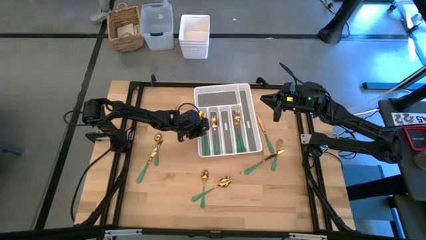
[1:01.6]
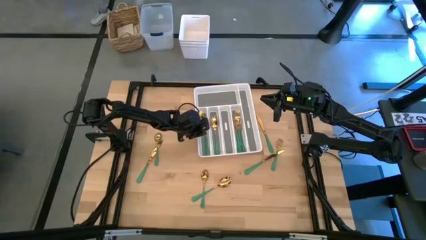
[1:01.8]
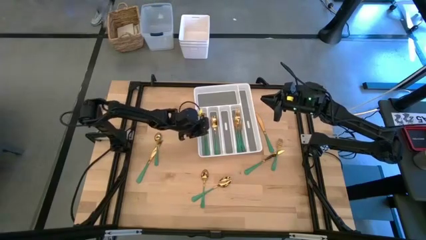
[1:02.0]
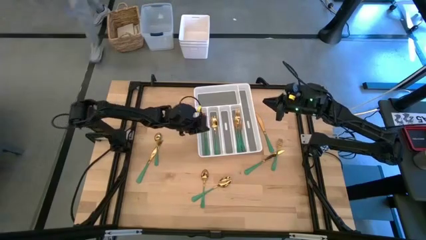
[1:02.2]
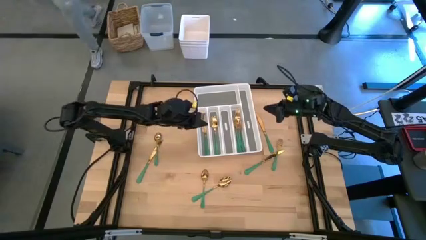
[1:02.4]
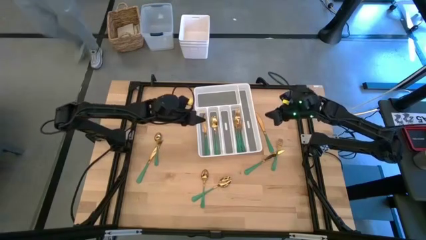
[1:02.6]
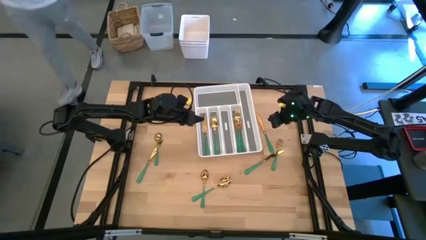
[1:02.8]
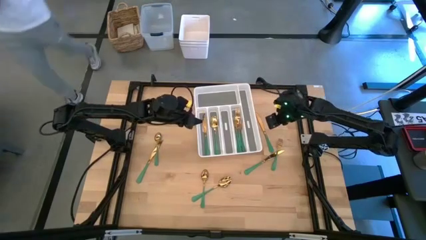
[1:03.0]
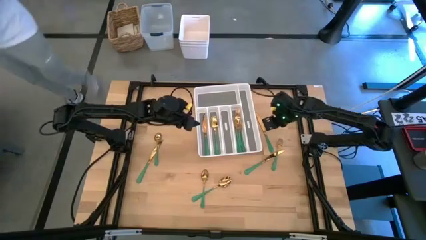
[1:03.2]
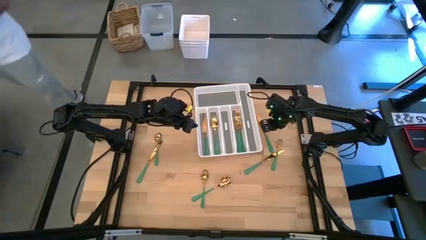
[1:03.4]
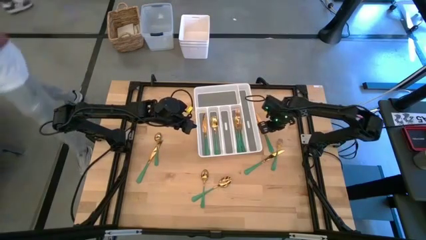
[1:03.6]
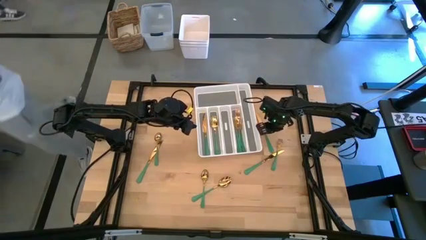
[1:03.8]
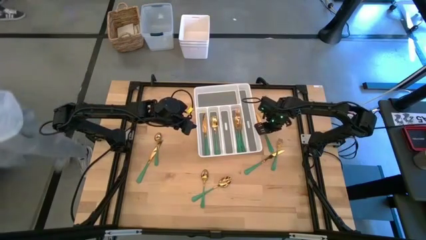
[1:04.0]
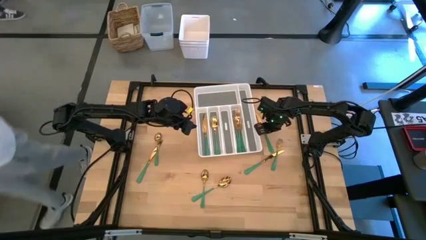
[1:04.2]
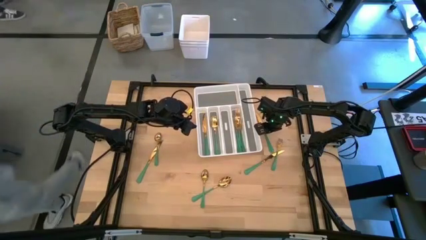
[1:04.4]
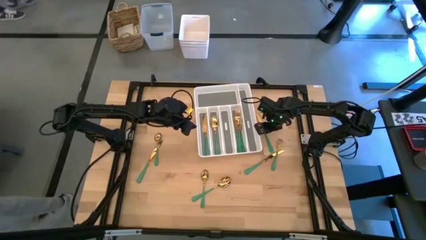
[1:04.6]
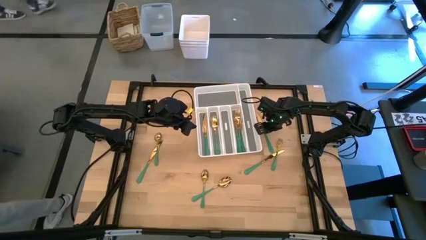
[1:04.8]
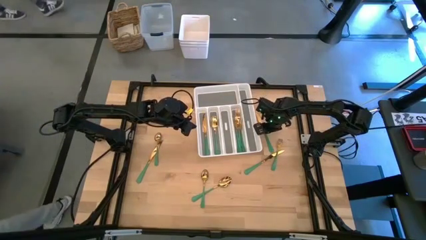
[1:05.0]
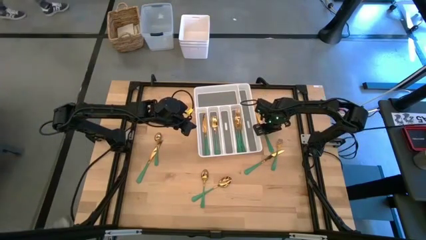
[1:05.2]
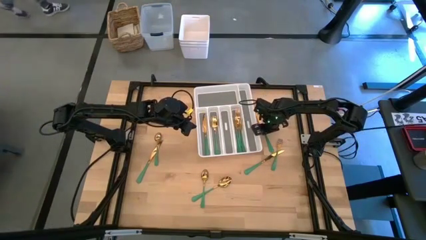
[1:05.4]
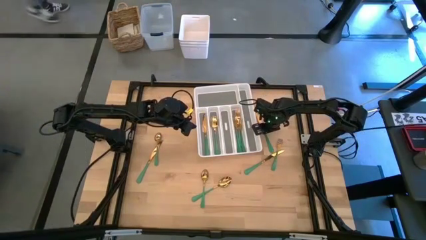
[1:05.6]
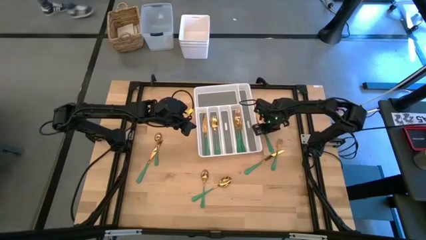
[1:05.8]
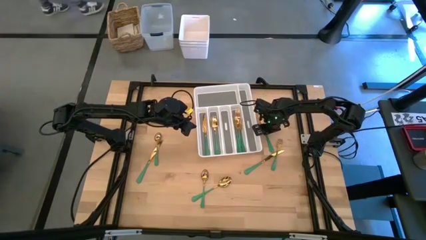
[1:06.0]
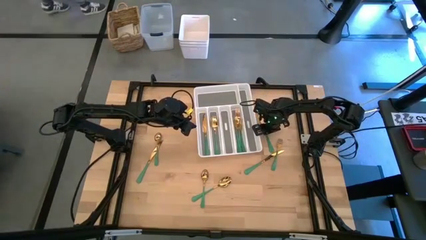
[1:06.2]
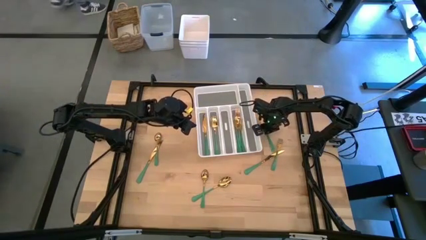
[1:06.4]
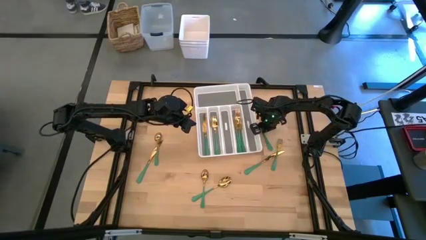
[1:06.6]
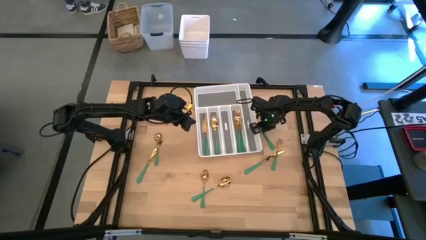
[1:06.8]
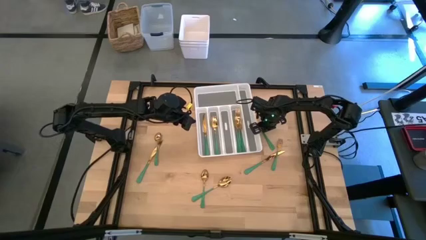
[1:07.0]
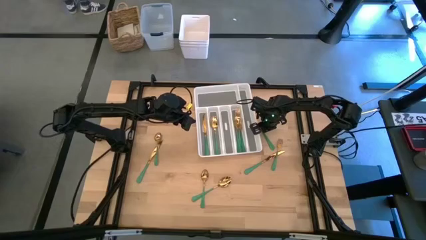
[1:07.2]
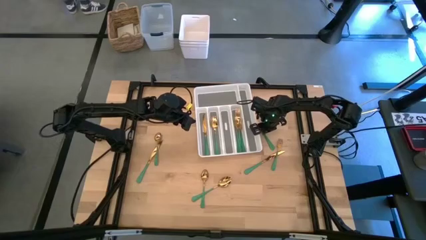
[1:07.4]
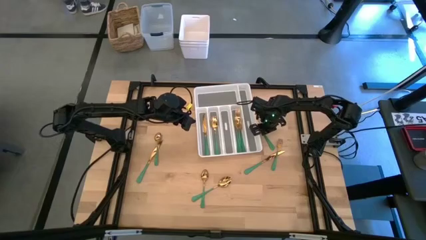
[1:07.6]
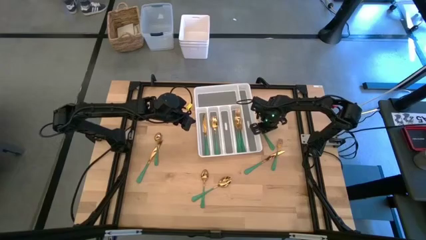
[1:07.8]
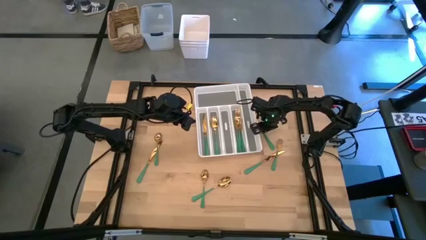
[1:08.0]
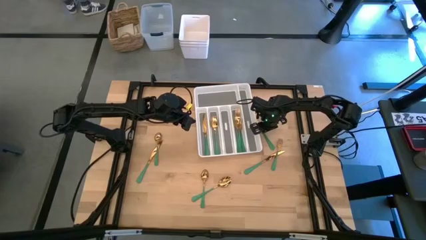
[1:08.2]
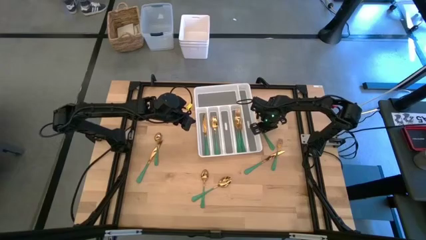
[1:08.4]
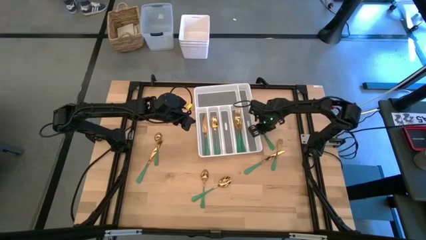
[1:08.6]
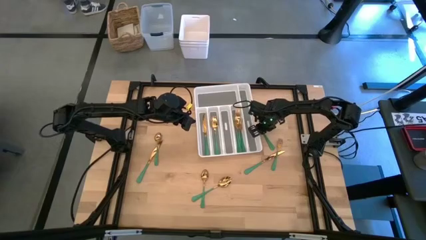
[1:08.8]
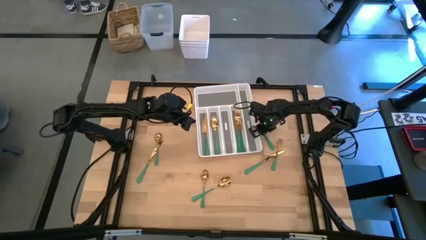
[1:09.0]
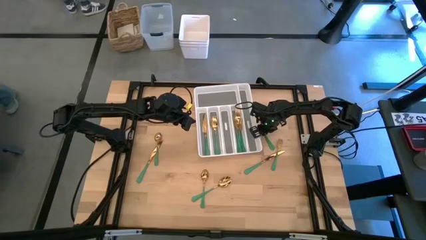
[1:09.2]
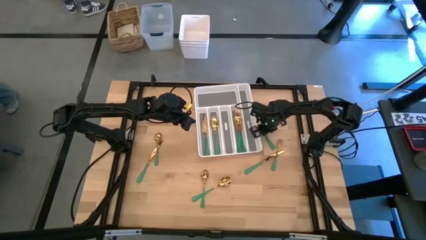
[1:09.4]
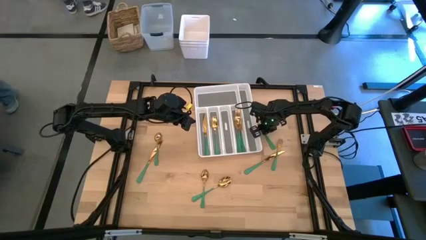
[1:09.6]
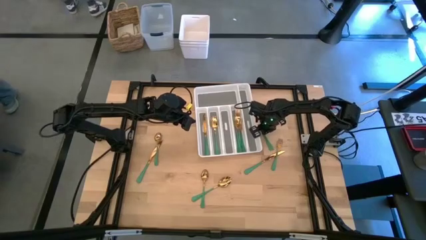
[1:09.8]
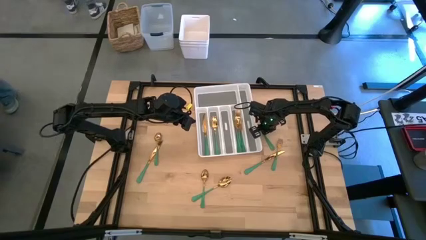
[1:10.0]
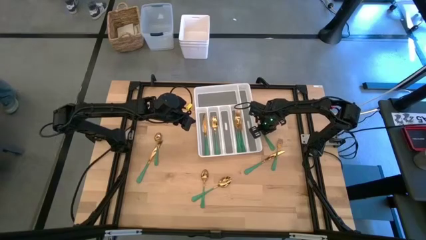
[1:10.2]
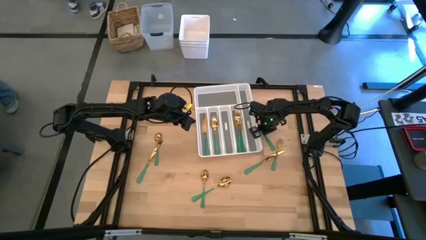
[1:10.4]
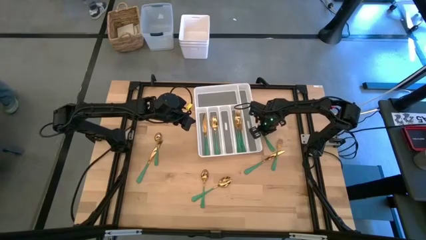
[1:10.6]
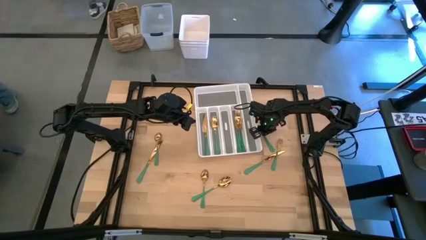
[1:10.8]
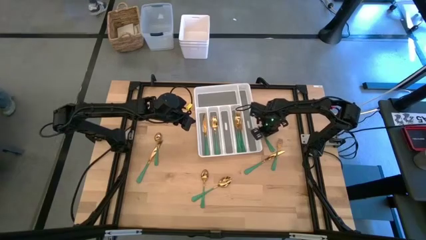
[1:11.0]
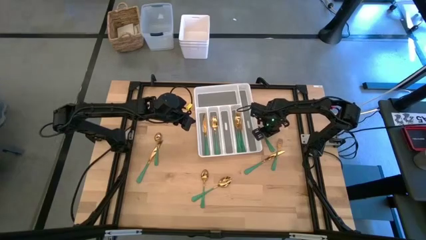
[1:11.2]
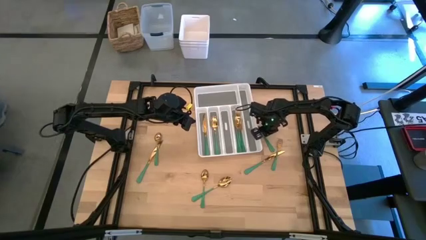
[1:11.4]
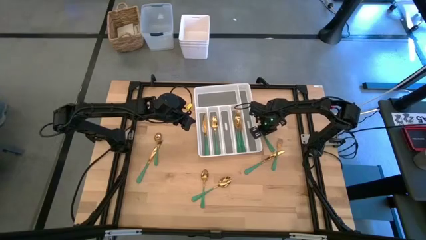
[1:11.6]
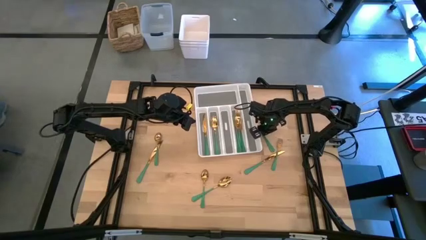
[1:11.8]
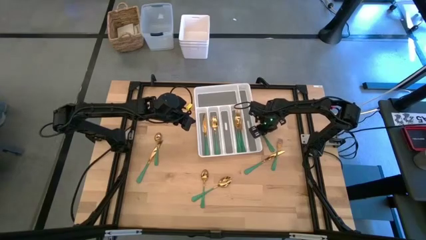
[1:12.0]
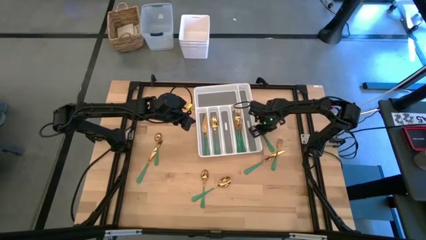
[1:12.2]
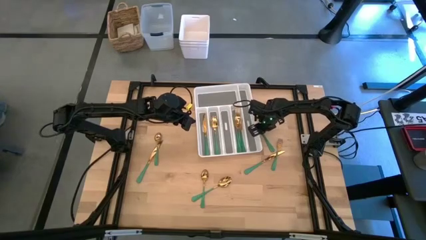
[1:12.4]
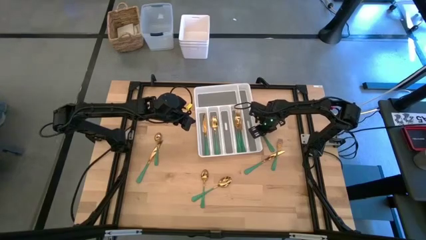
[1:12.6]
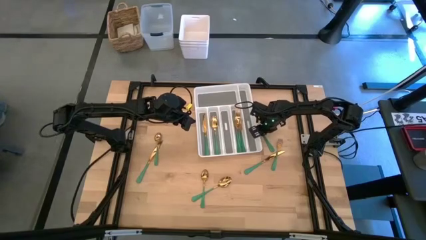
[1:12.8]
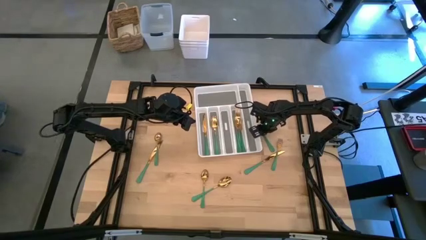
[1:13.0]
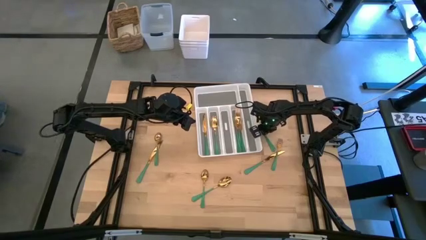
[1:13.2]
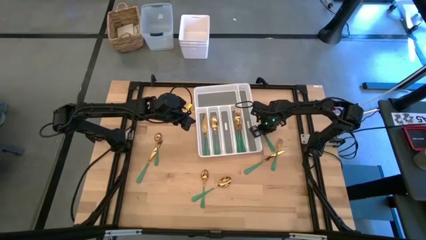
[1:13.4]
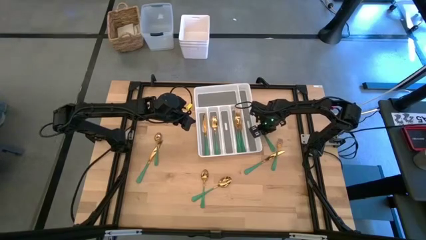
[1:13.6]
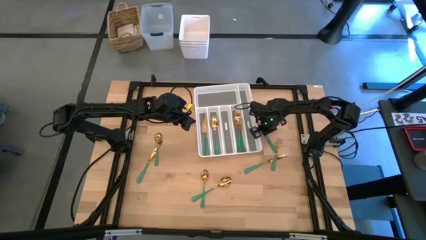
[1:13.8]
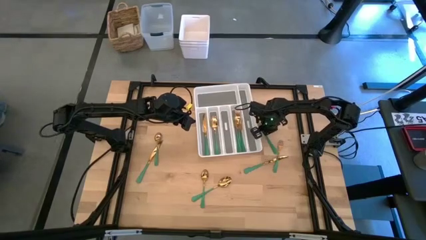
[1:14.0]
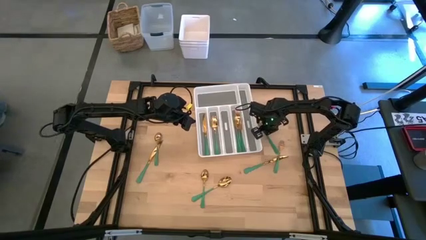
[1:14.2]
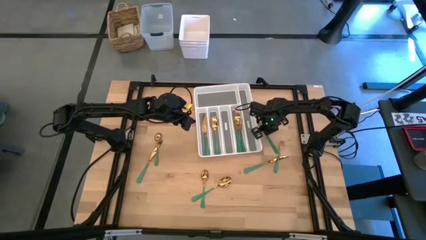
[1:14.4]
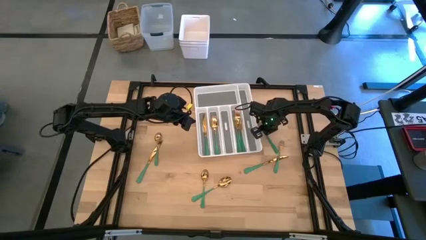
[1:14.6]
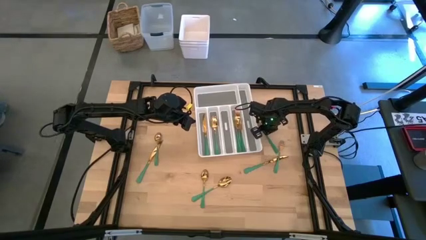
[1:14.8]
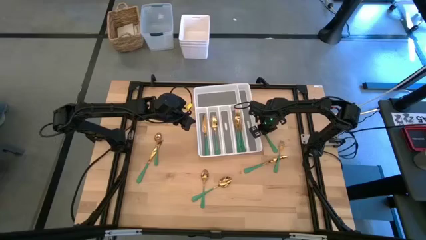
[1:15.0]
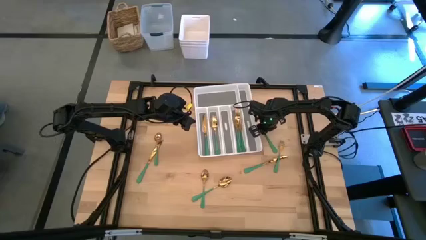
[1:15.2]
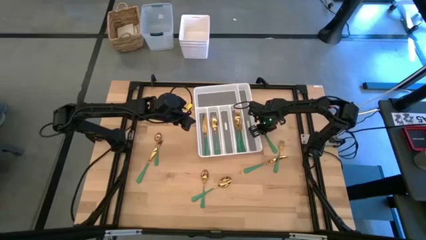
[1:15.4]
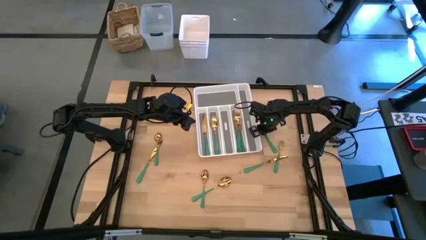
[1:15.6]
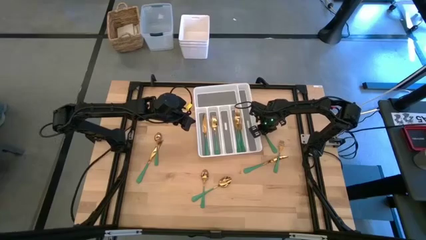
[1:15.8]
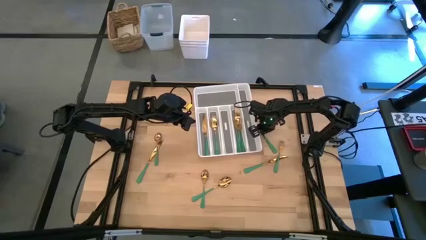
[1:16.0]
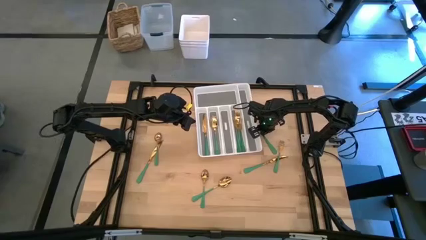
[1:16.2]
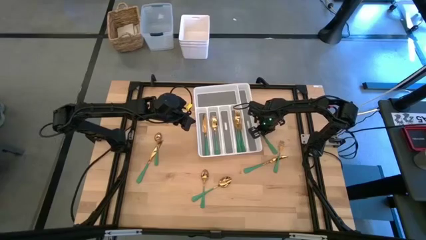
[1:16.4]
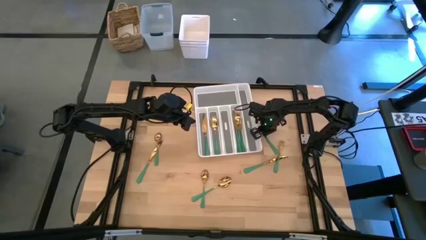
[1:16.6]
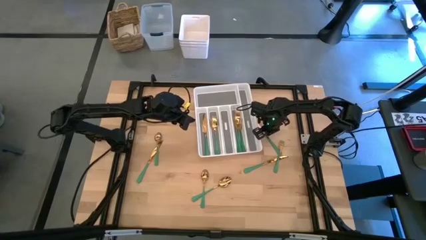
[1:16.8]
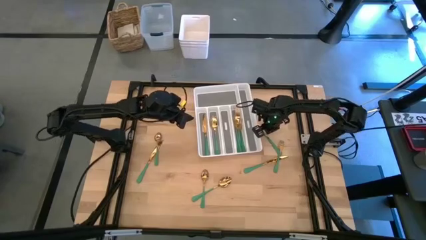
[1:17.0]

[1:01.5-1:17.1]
Task: Sort silverware
Put the top right knife into the silverware organizer

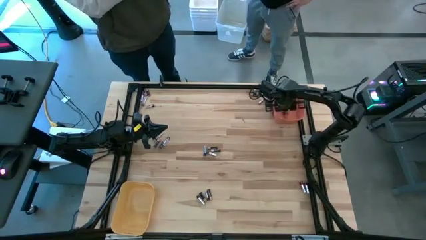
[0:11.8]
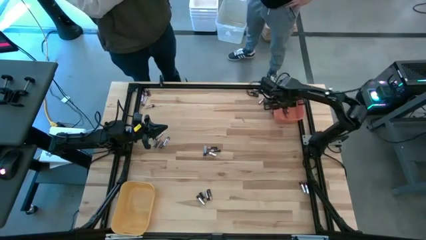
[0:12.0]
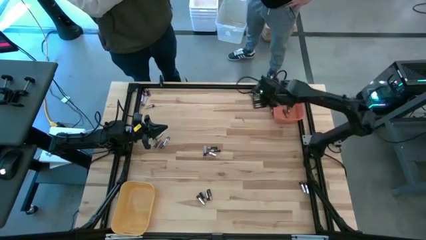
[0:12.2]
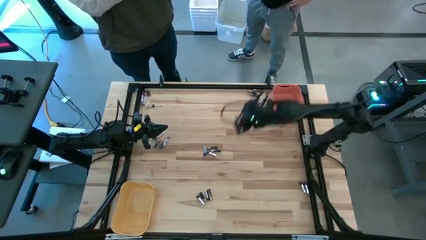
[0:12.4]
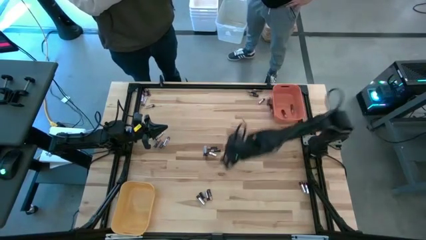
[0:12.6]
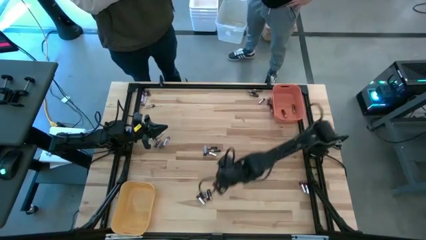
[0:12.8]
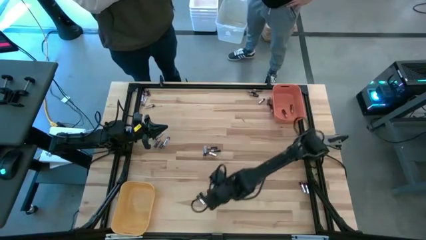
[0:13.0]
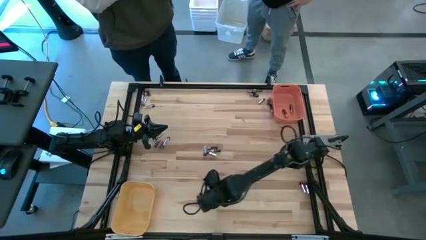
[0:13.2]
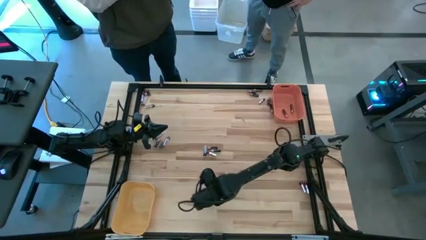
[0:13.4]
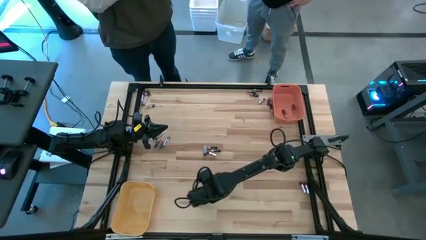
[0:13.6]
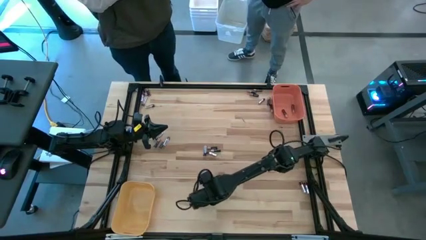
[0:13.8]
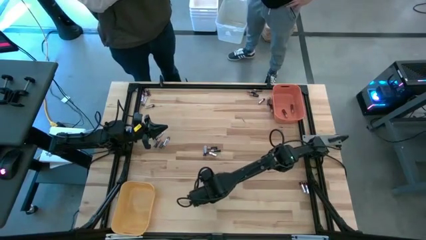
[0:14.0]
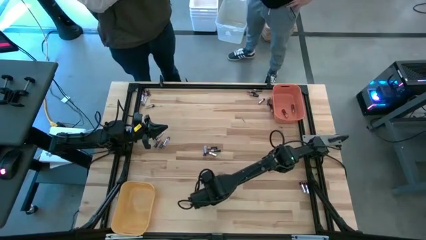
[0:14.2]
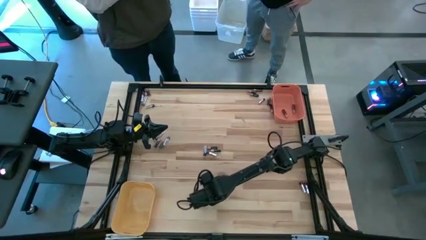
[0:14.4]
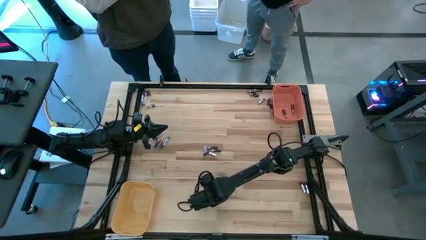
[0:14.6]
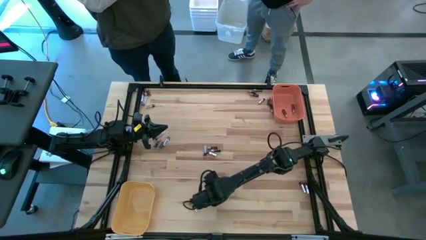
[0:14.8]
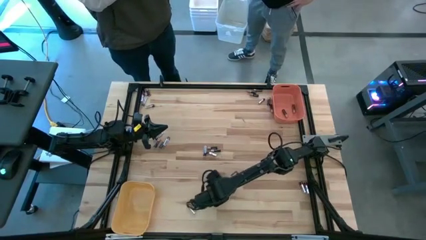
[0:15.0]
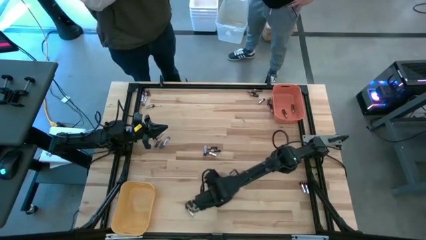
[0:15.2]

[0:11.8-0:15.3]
Task: Sort batteries
Put the black battery into the orange bin
